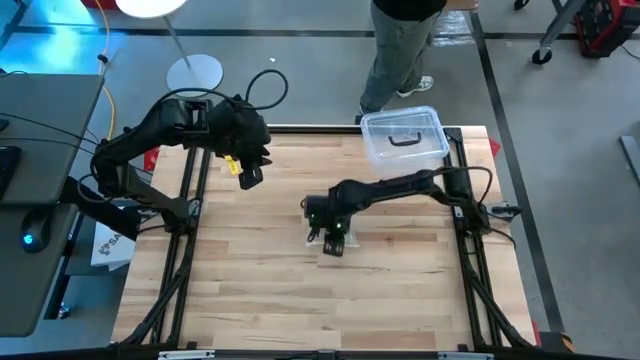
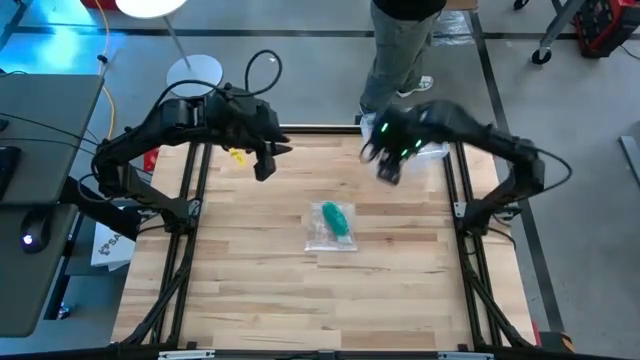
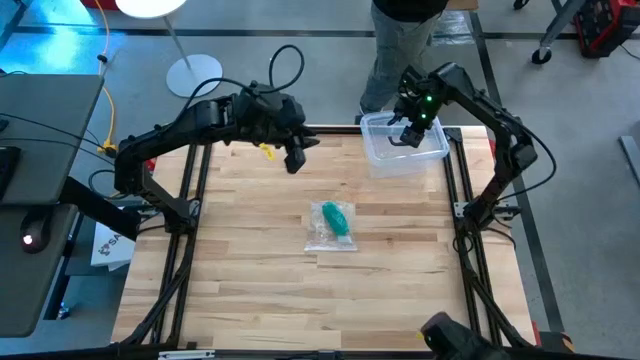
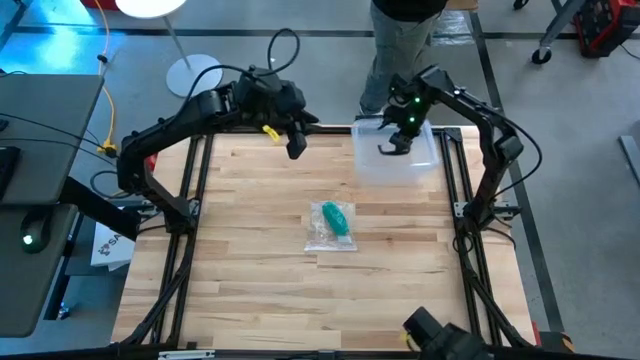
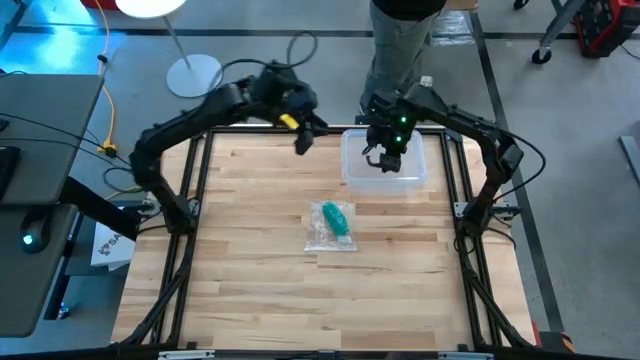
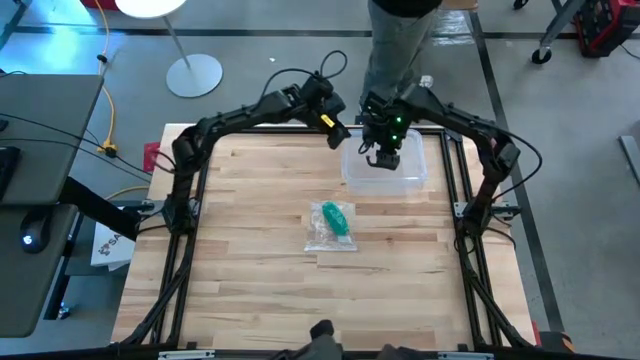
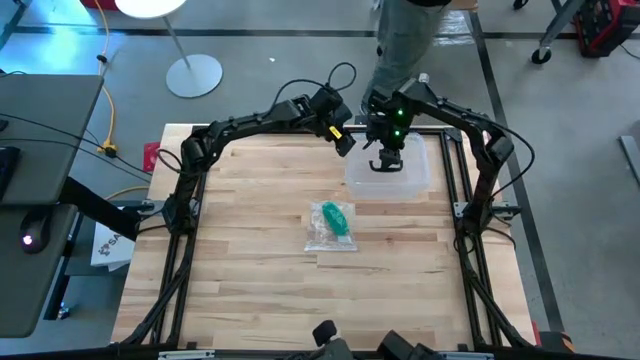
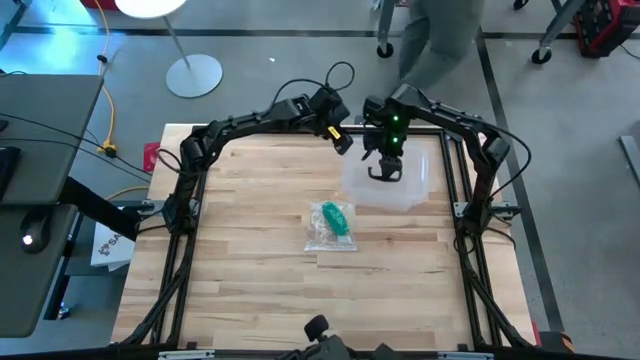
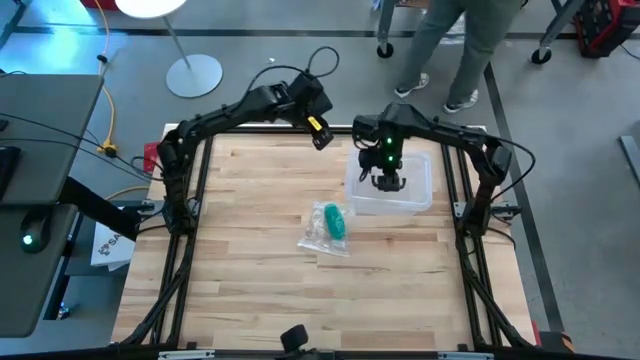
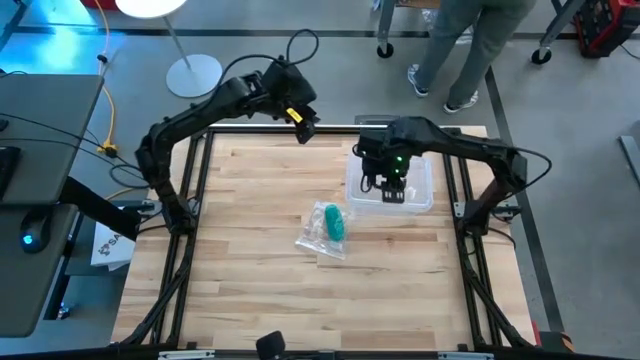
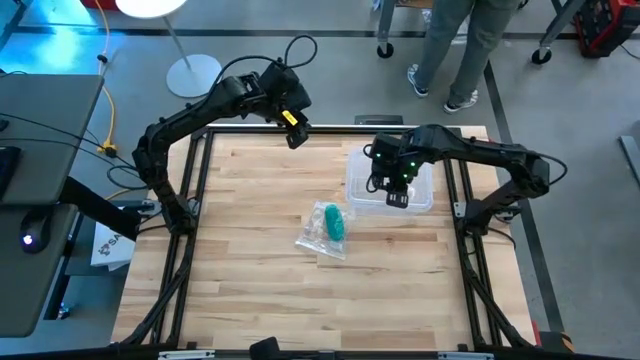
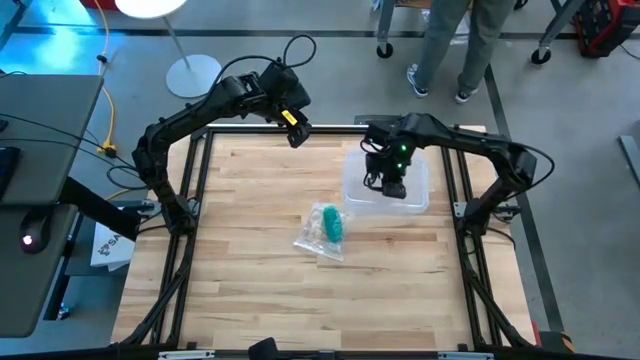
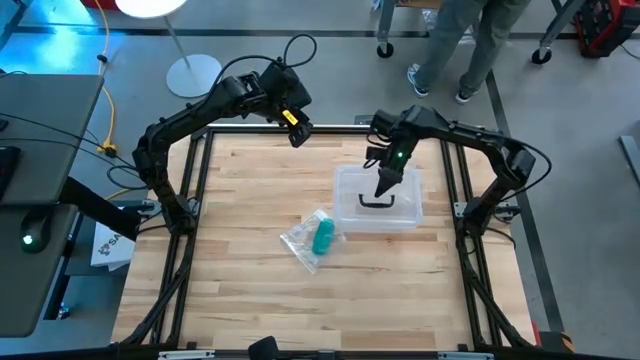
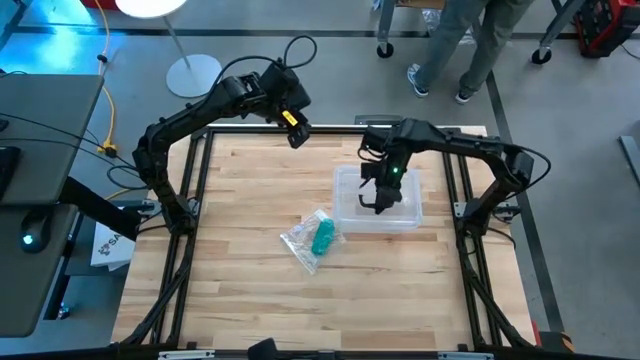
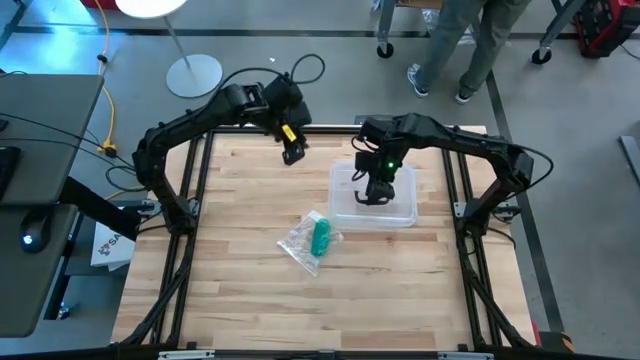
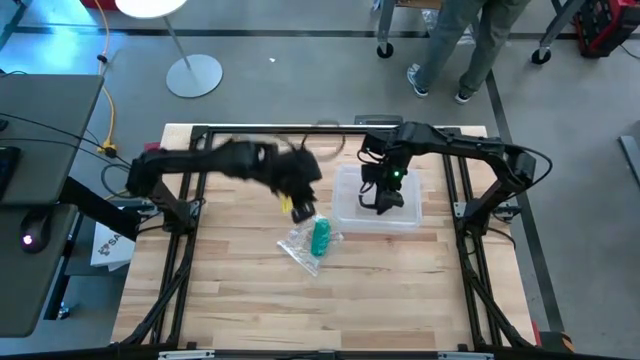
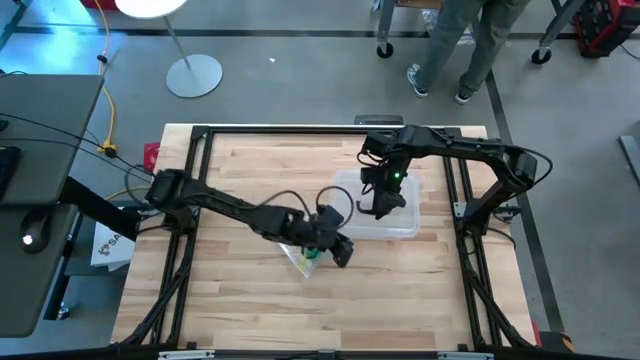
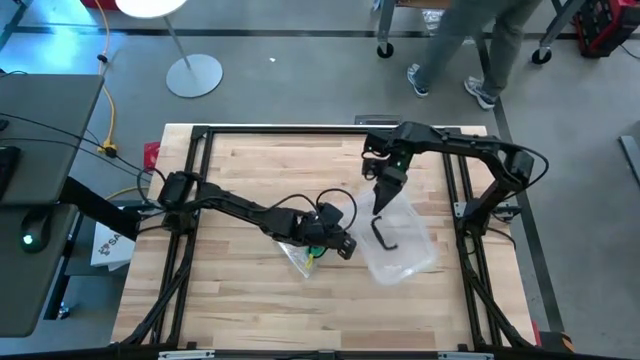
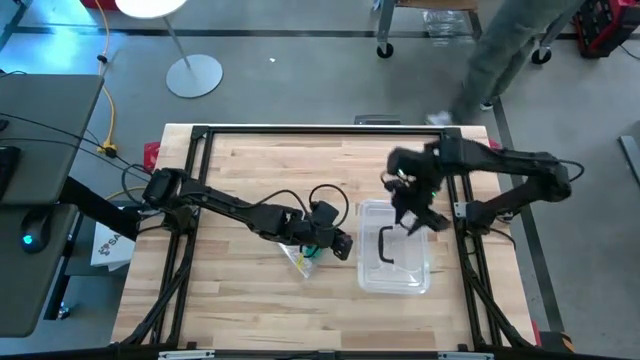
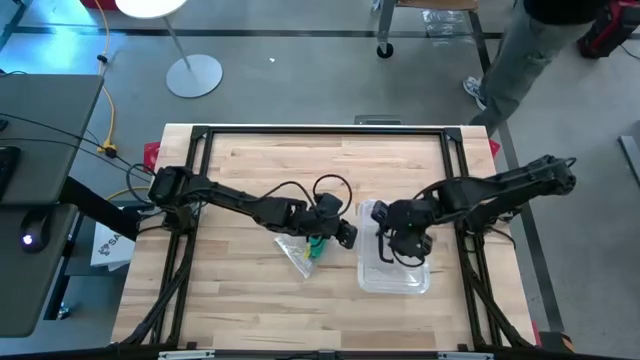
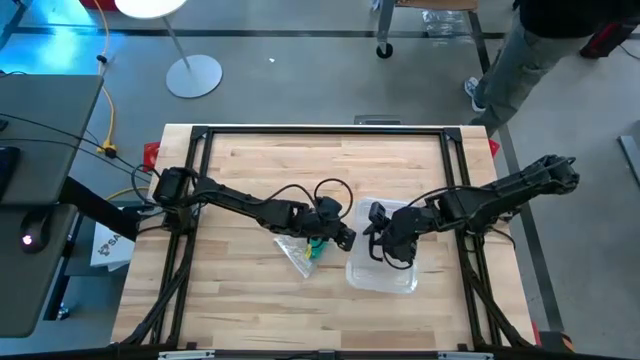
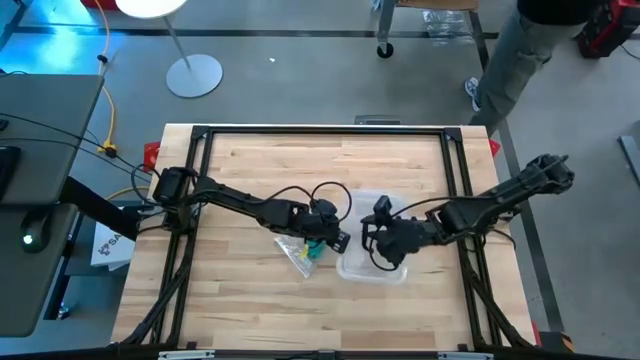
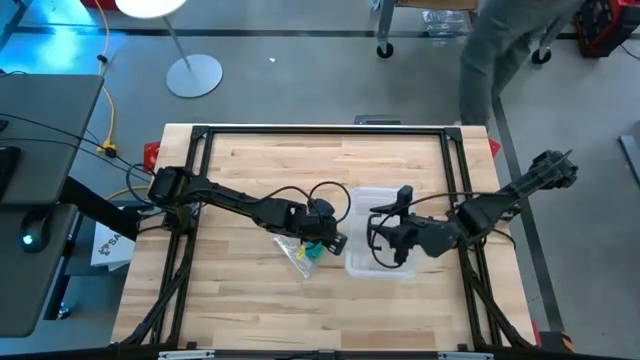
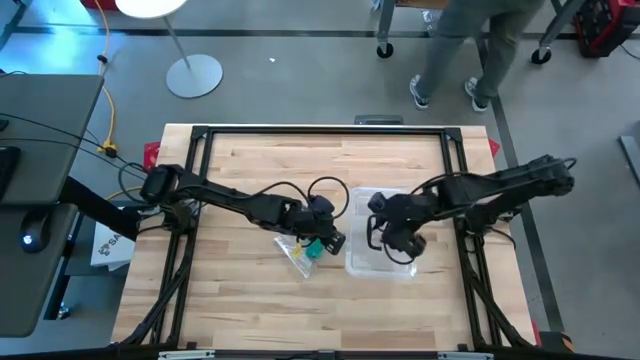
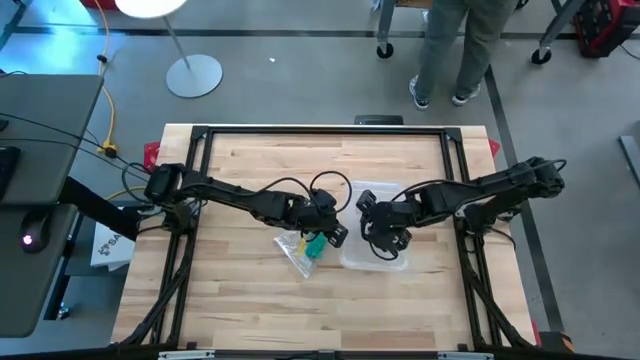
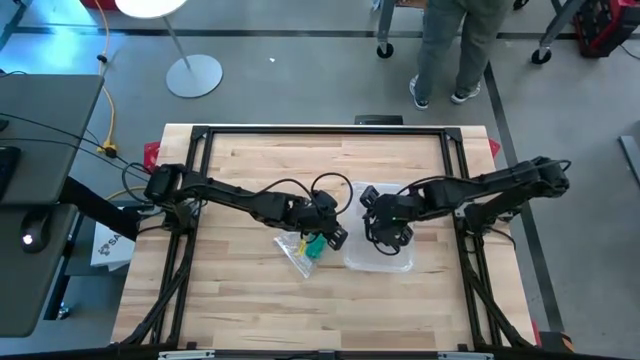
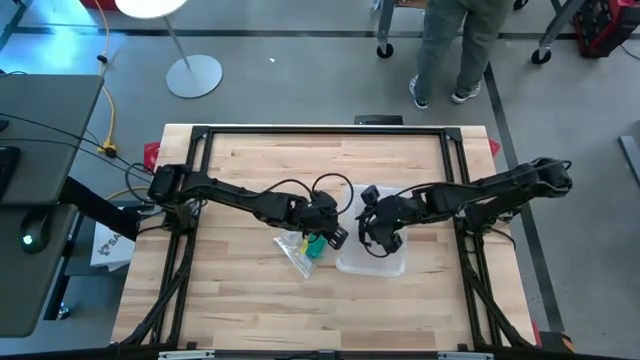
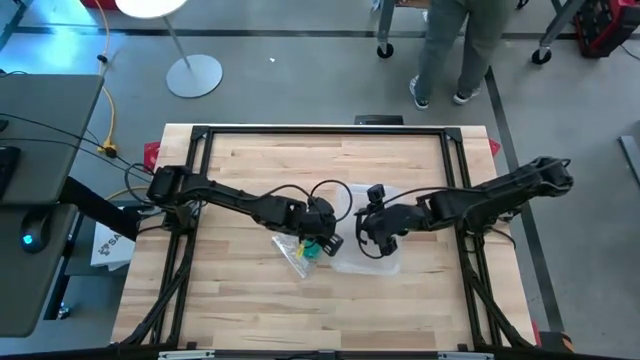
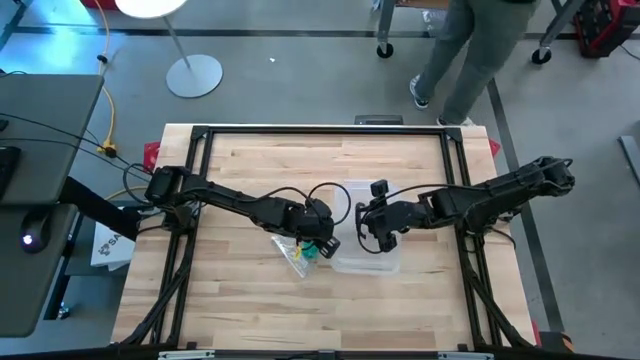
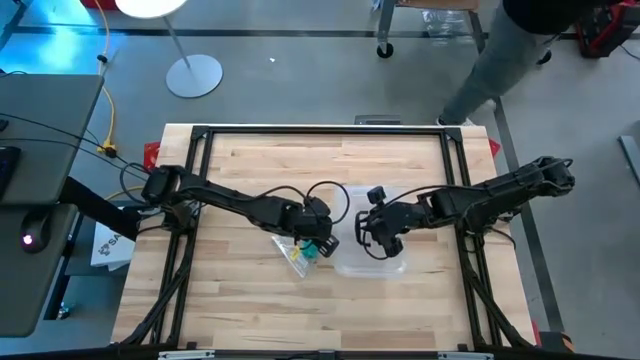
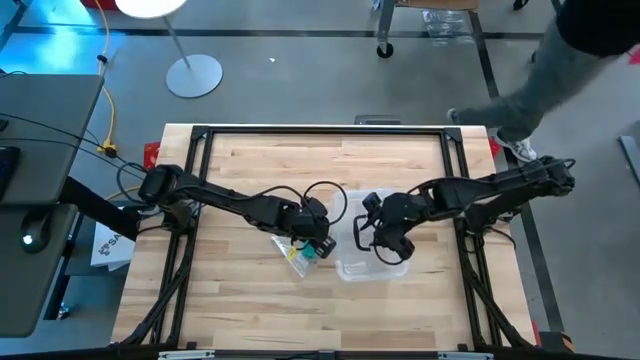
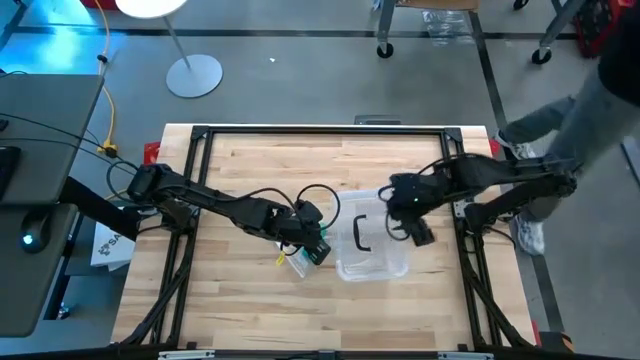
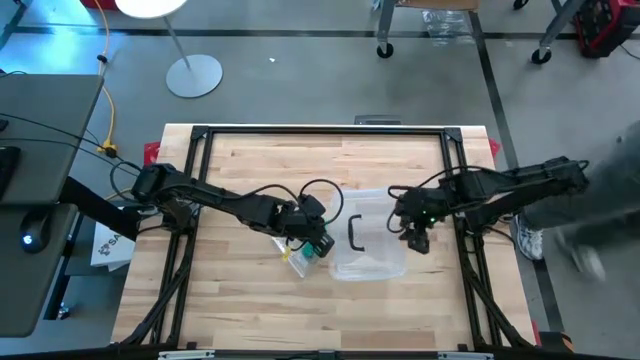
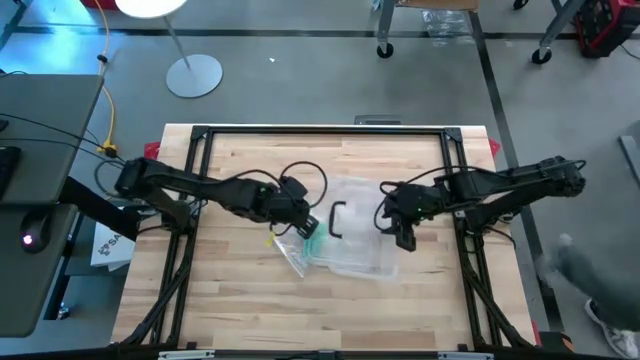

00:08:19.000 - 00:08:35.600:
Task: Roll bandage
Open the transparent bin

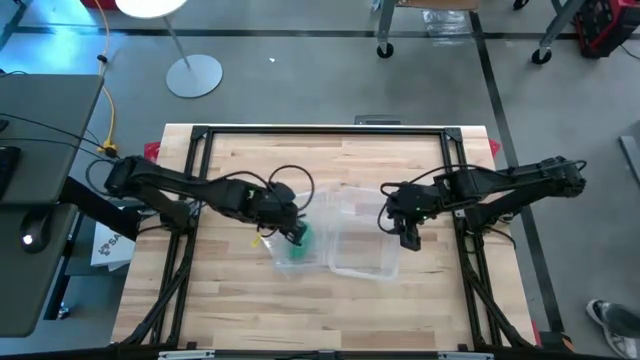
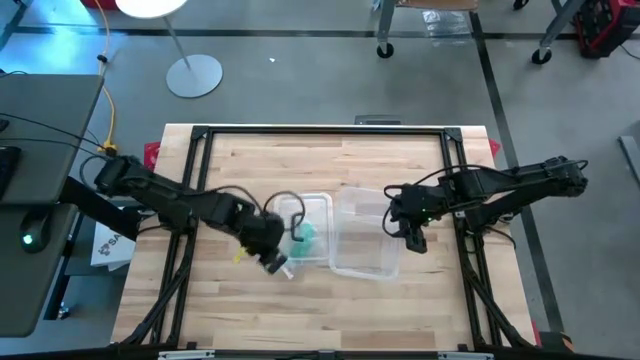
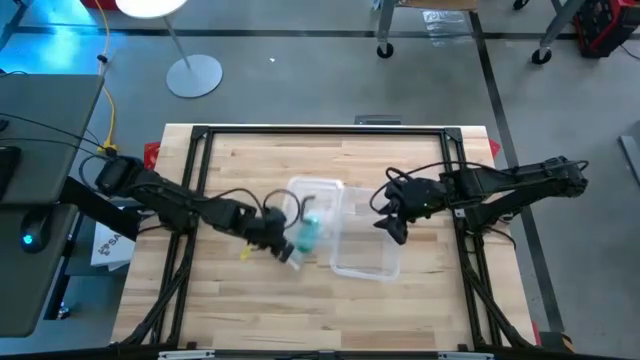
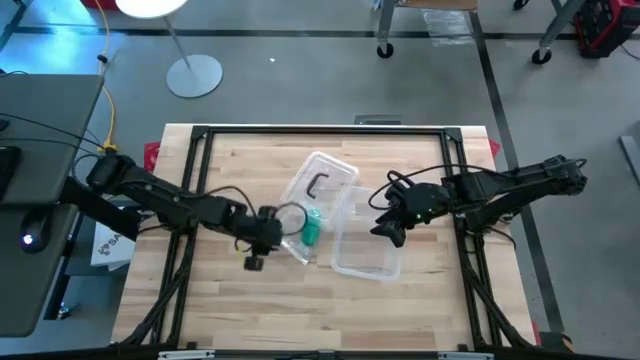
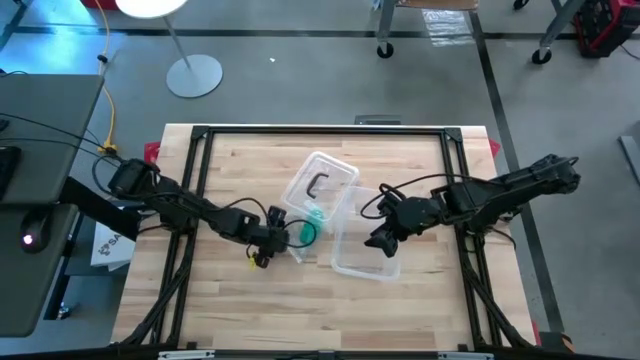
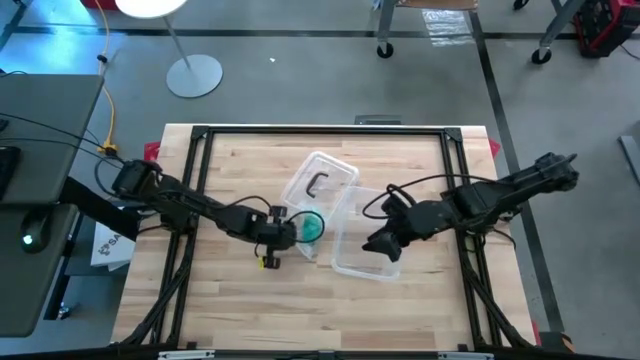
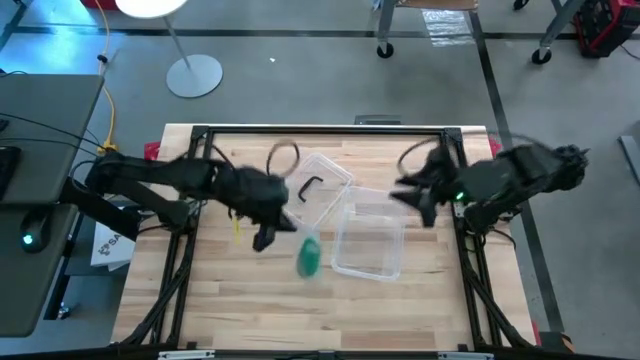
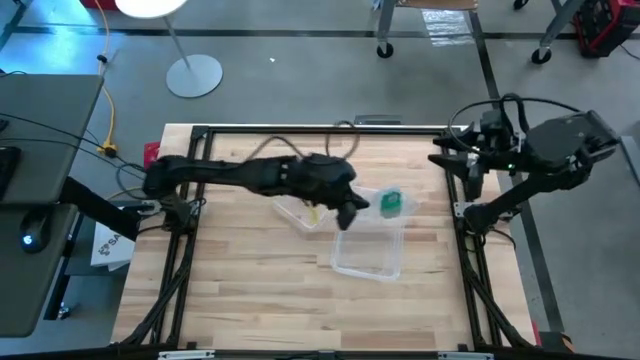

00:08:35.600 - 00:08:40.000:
Put the pack of rolled green bandage into the transparent bin

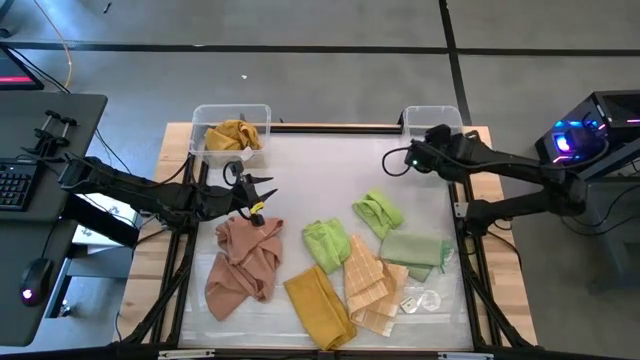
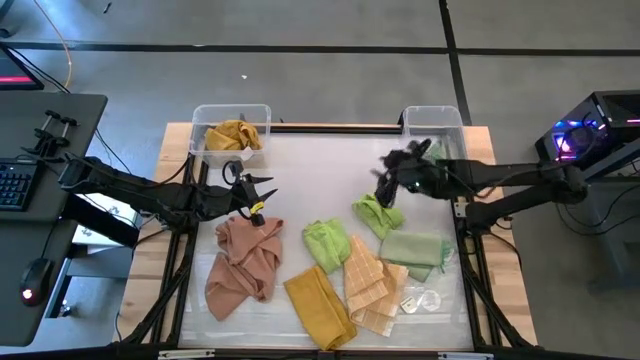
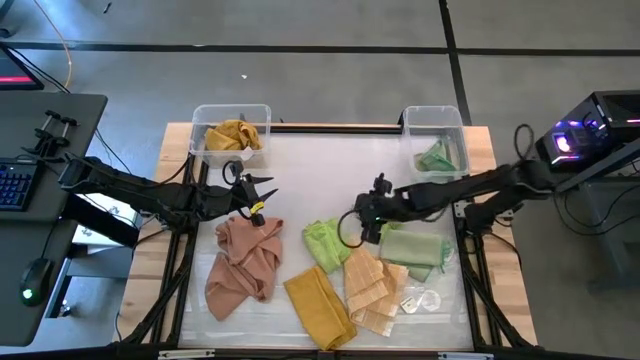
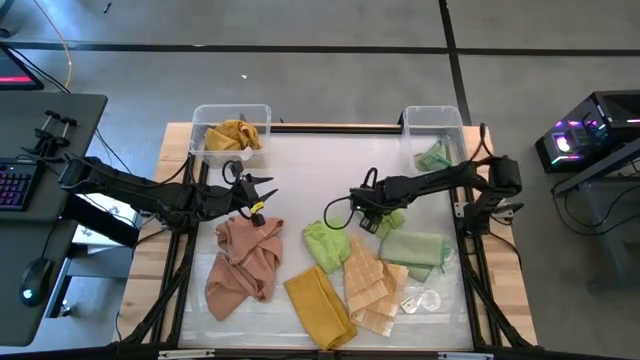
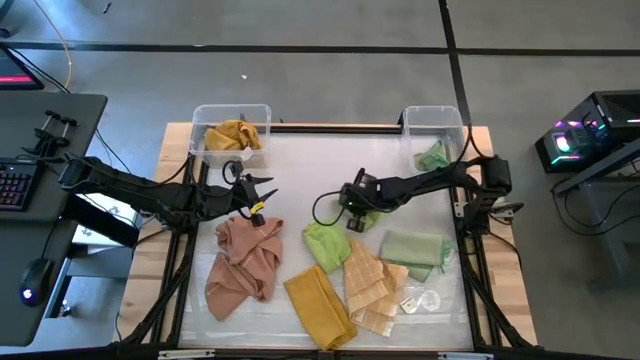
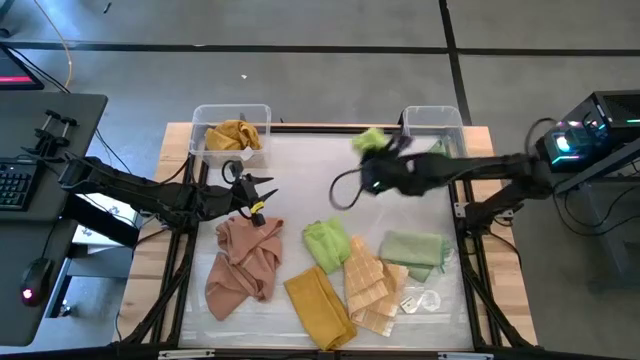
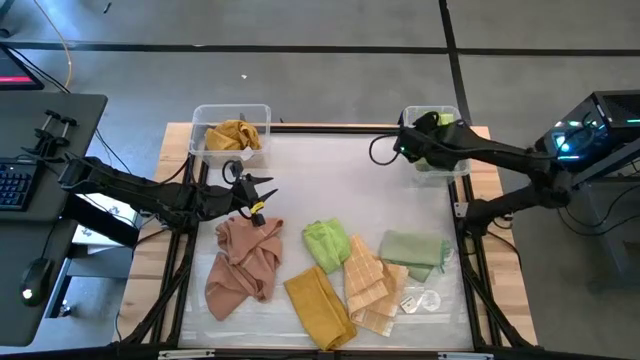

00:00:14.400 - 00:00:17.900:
Task: Sort towels by color in basket
Put the top green microfiber cloth into the right transparent bin
